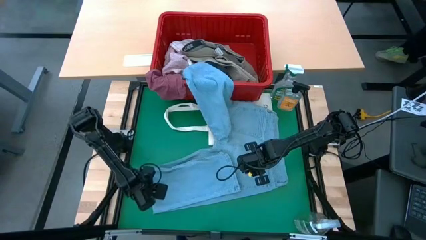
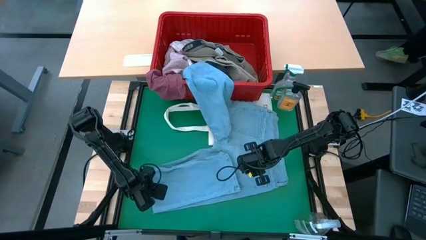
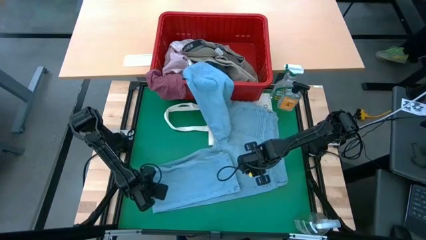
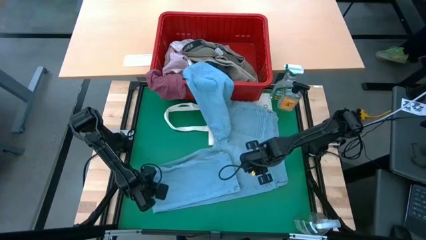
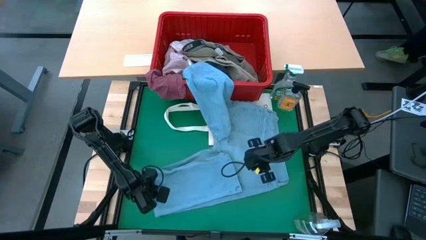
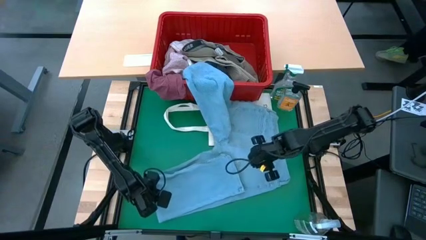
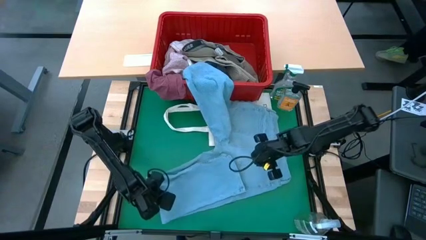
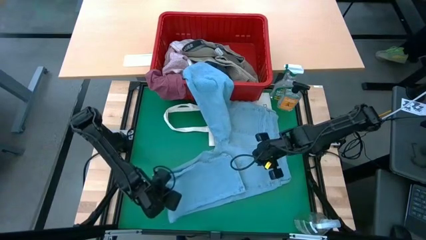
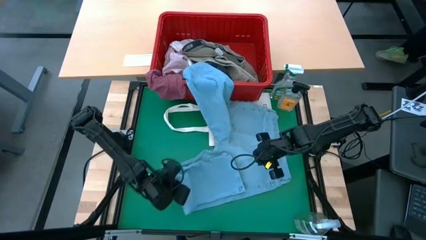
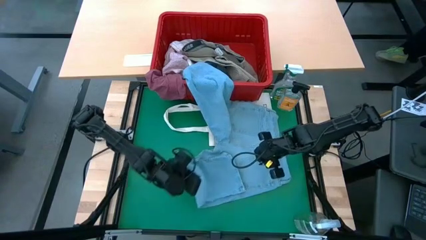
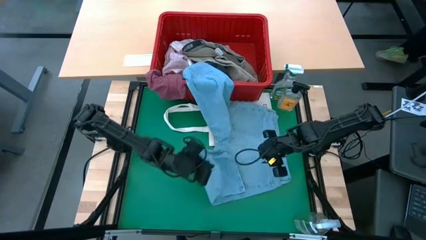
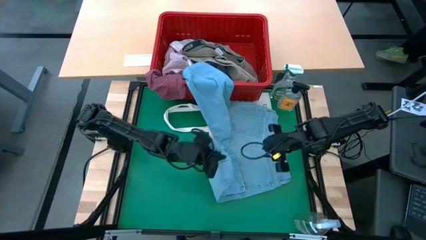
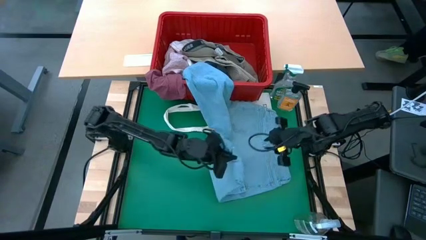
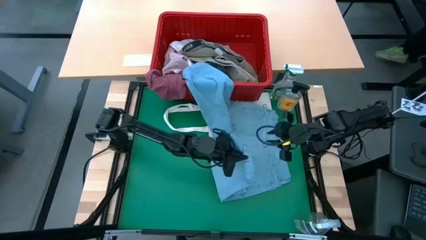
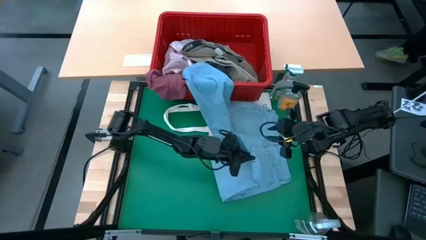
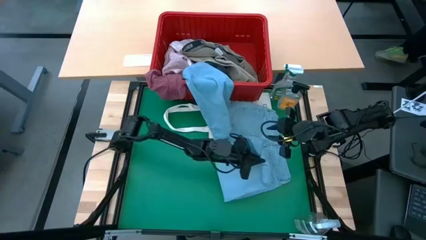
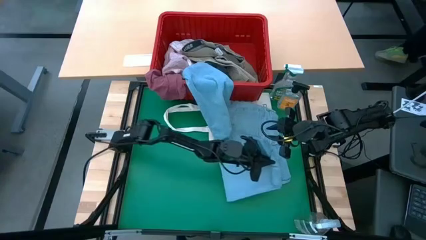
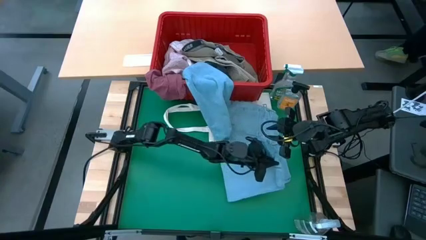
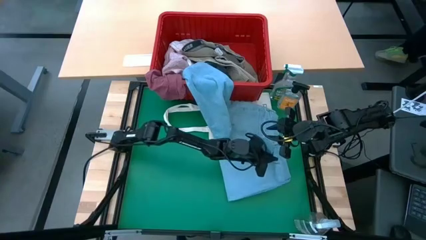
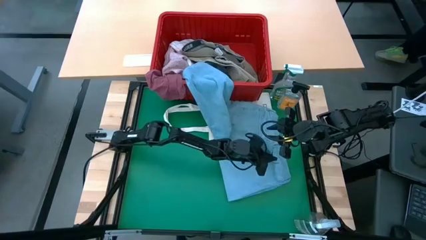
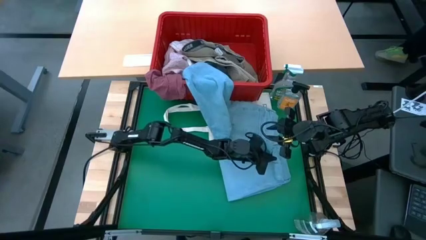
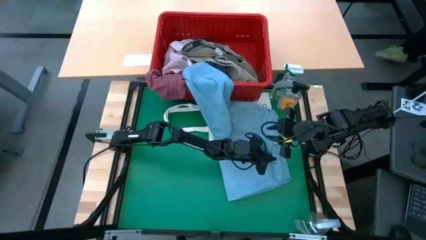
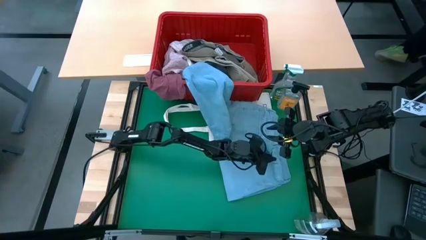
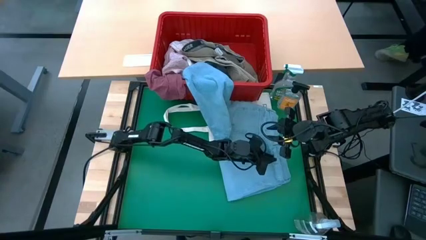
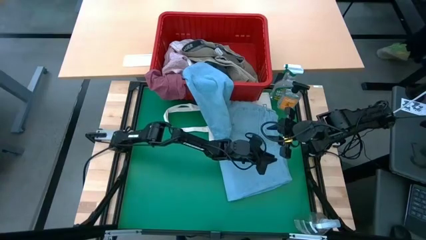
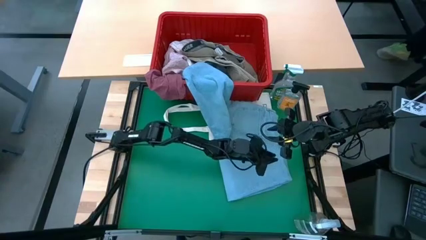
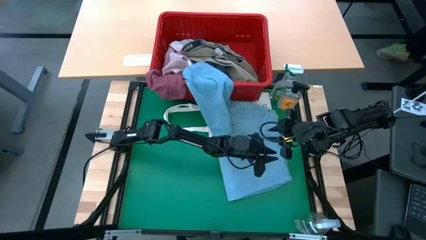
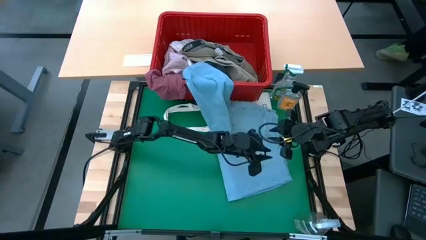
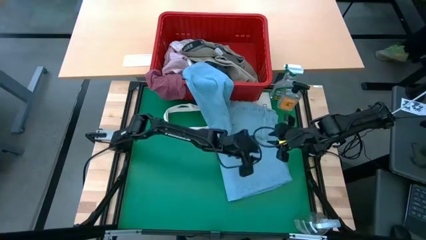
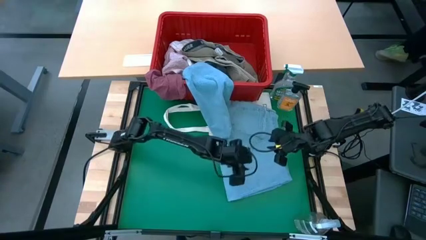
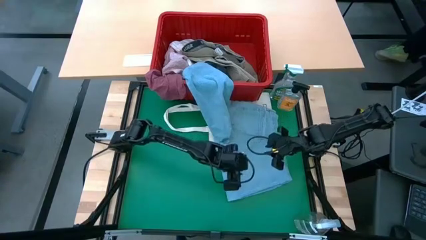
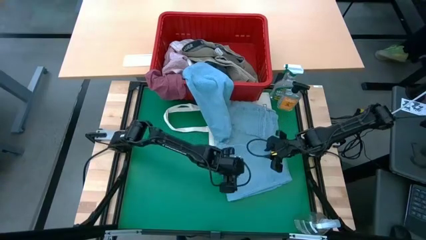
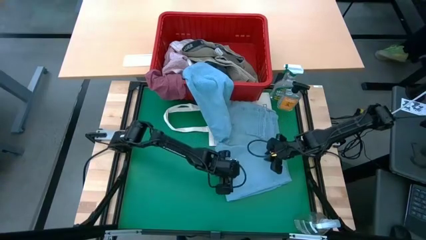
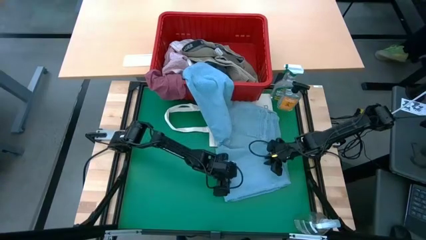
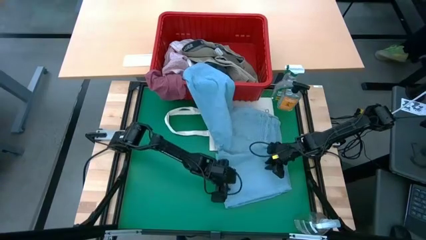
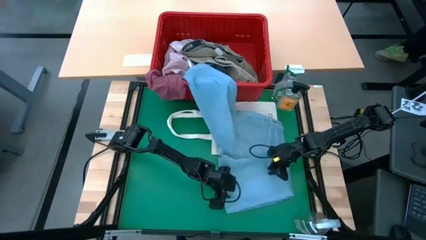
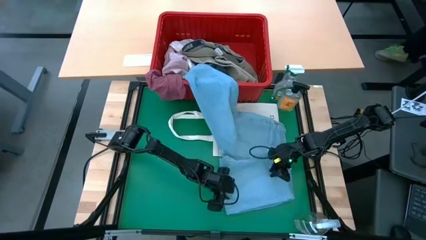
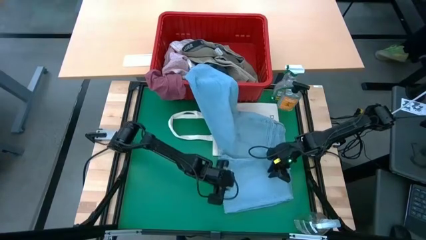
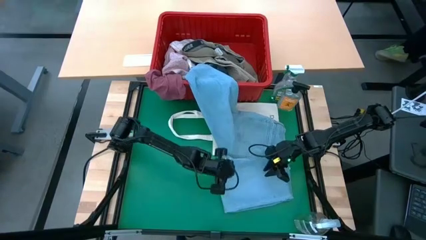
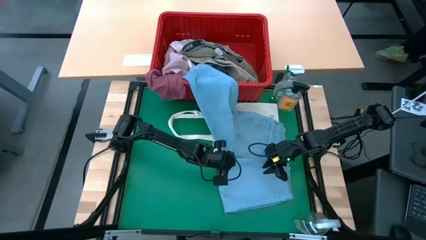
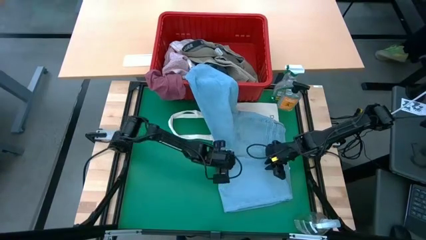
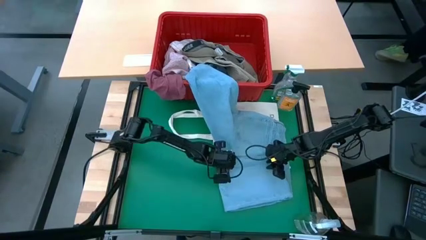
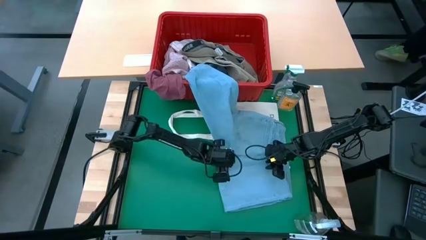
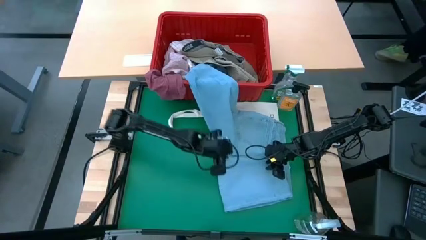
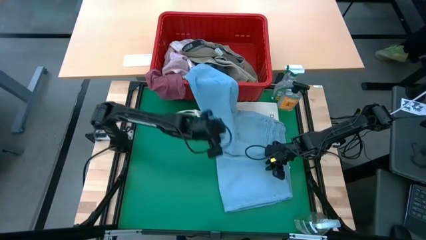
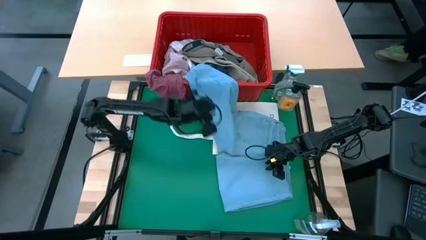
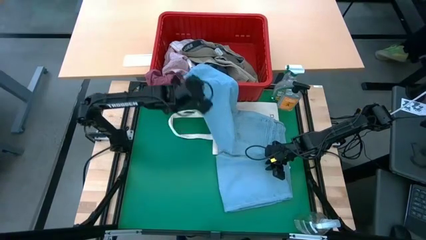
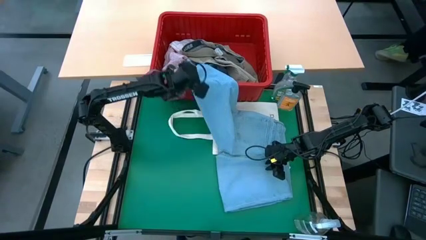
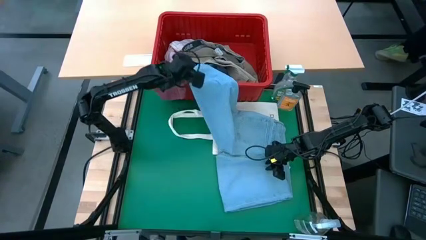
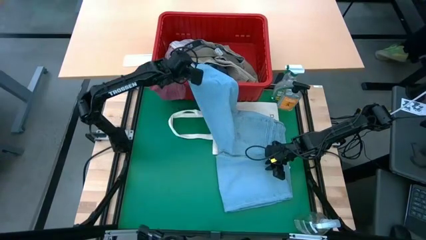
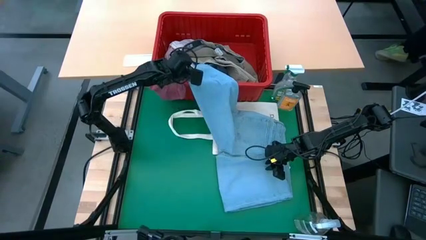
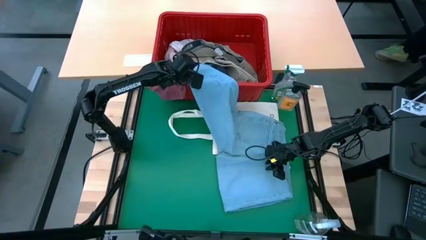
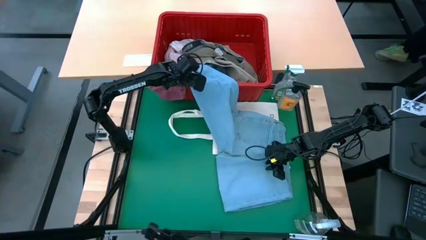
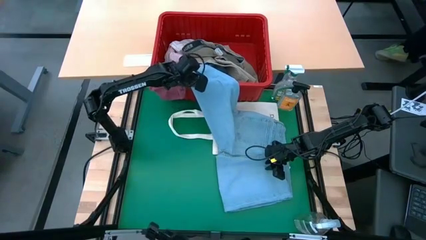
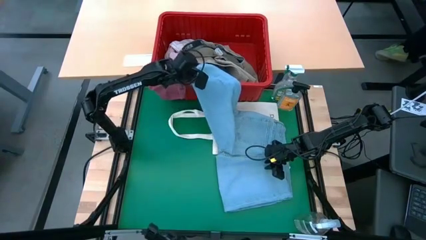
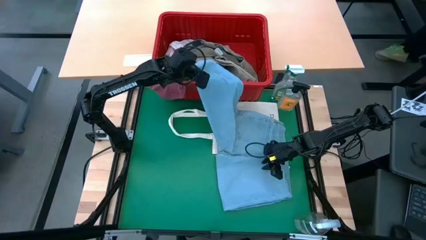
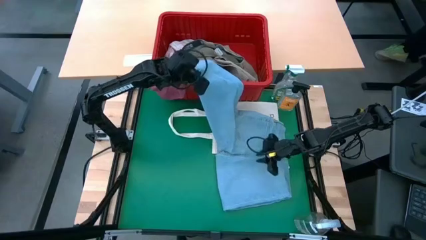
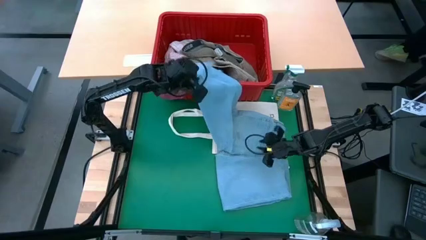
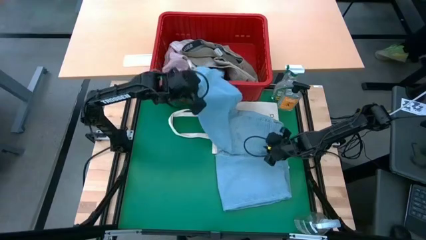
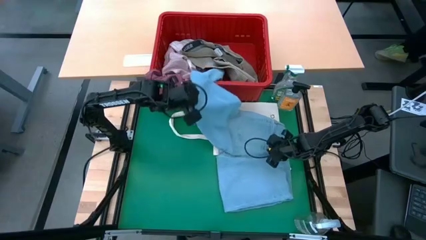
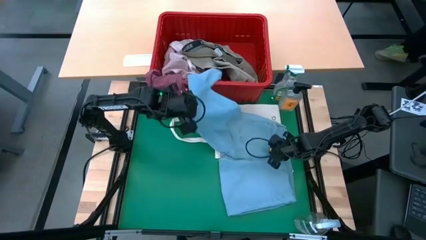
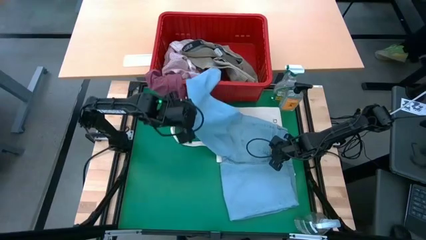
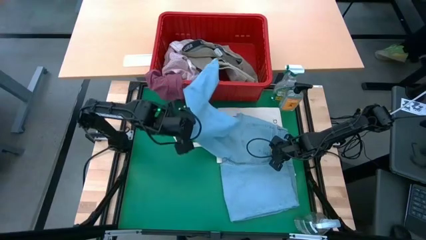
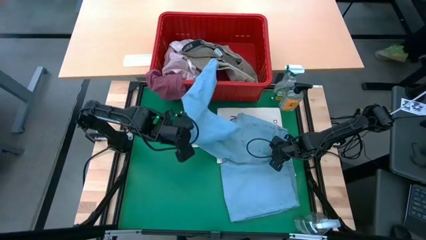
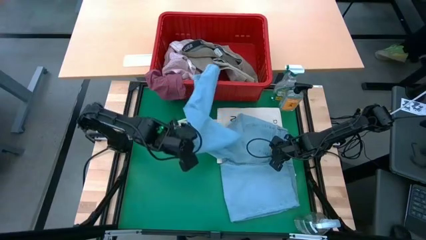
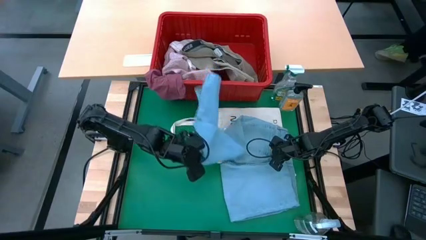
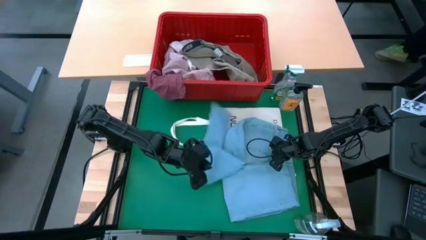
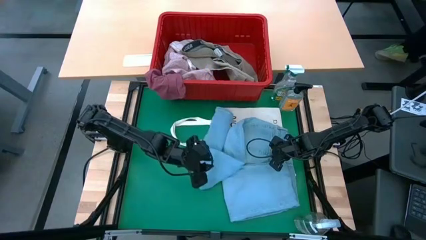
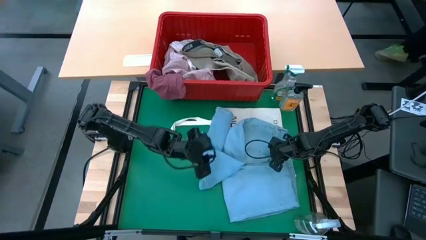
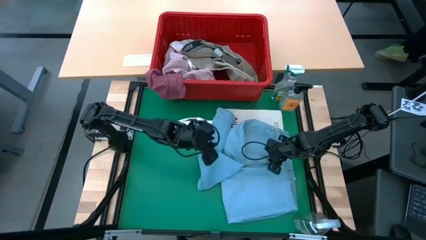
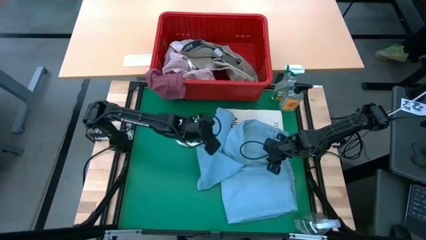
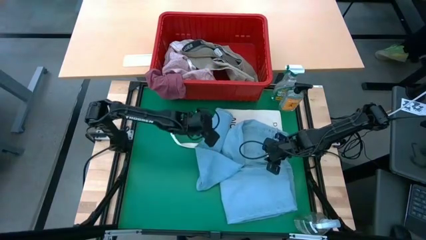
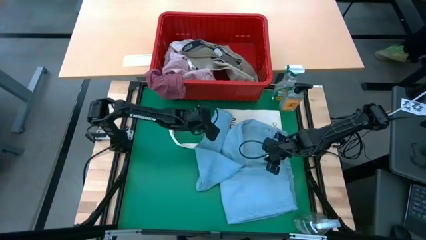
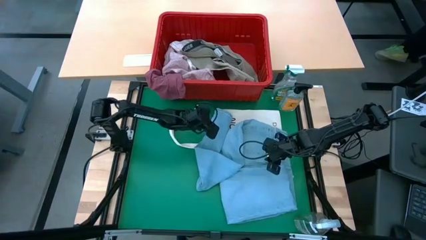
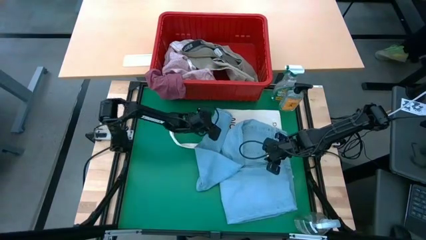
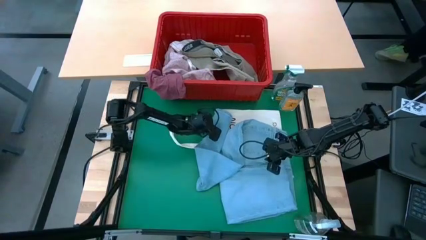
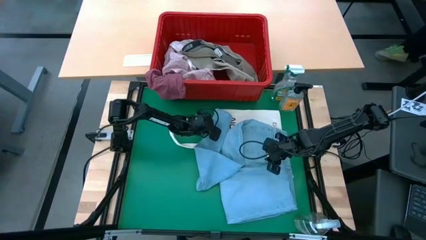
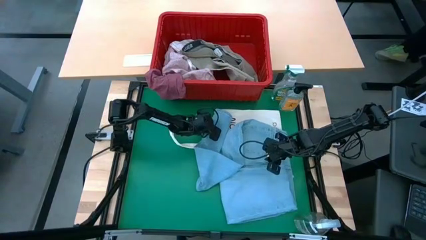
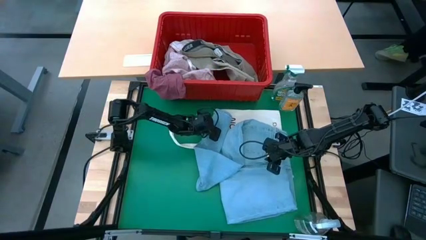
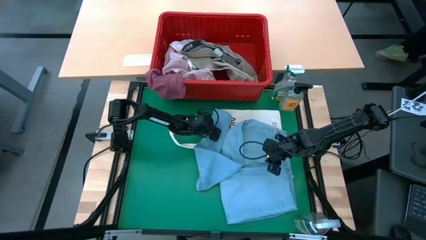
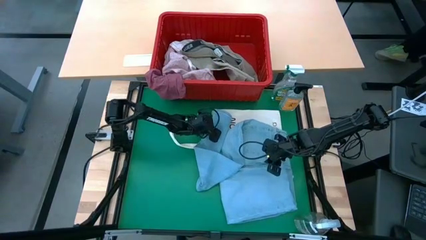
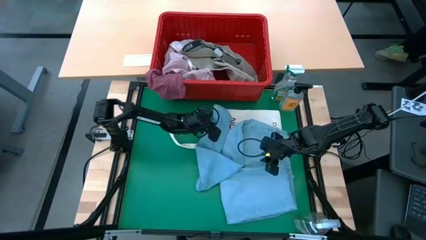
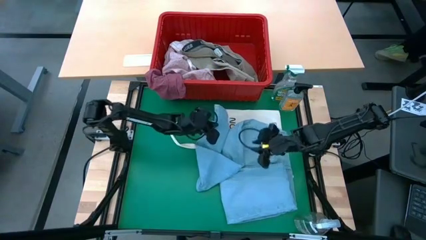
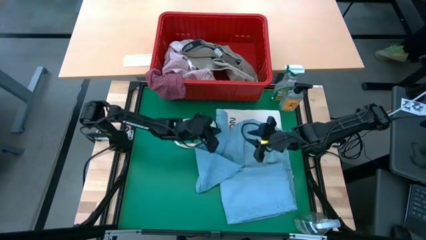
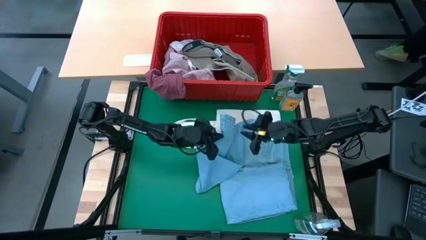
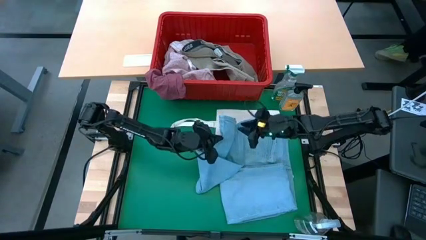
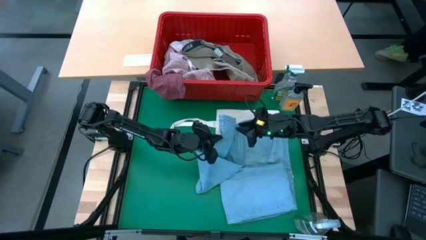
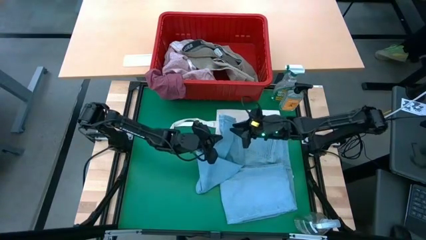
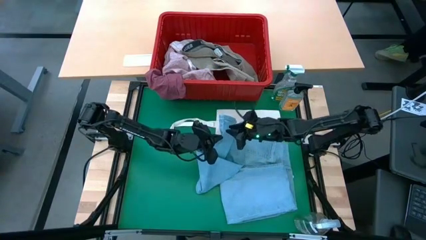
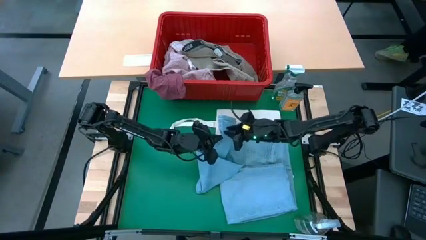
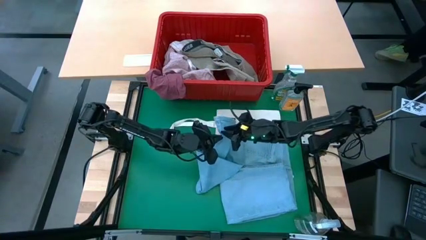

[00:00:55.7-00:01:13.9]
Task: Fold Laundry from Bin
Fold the blue pants from the red laundry basket
